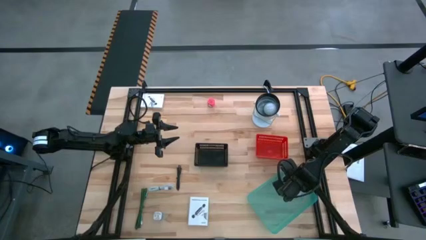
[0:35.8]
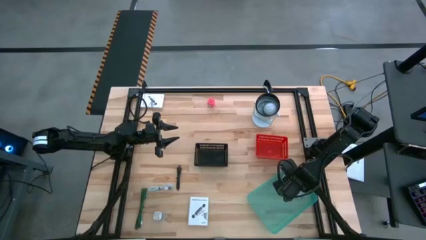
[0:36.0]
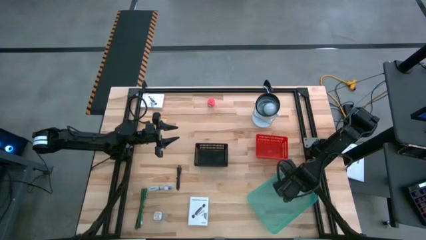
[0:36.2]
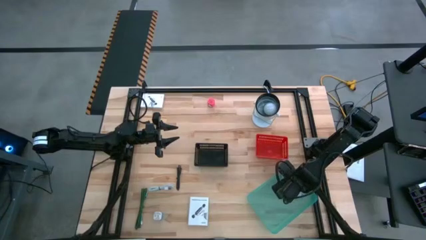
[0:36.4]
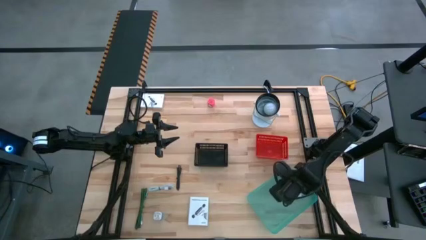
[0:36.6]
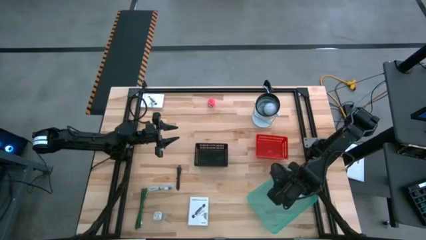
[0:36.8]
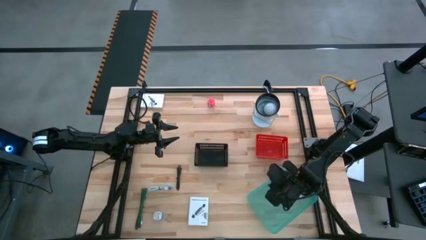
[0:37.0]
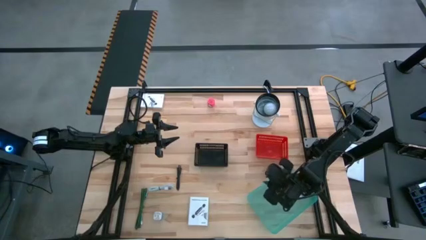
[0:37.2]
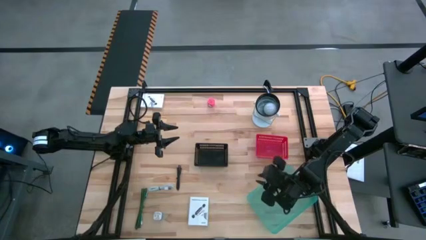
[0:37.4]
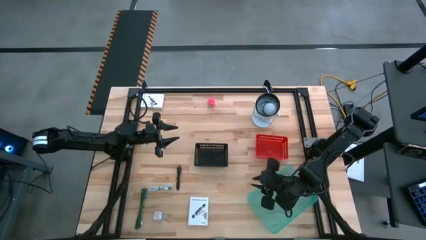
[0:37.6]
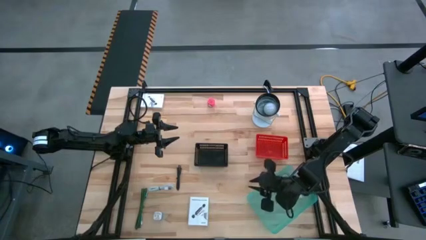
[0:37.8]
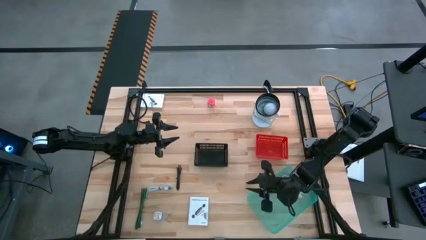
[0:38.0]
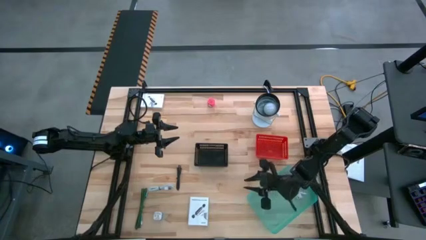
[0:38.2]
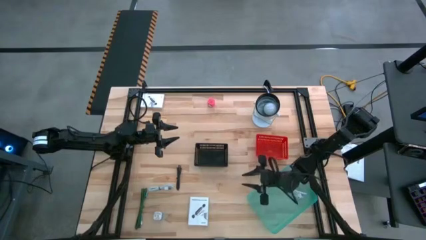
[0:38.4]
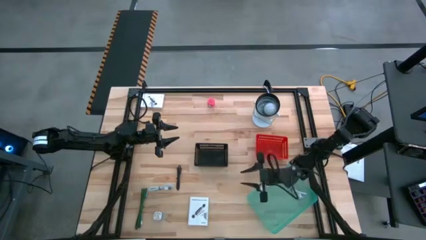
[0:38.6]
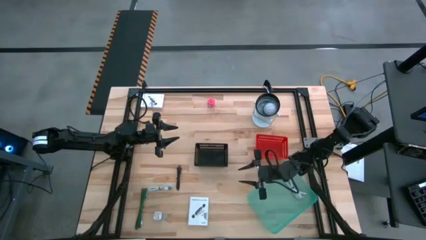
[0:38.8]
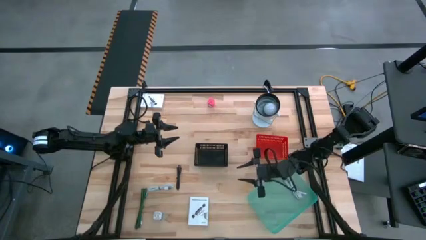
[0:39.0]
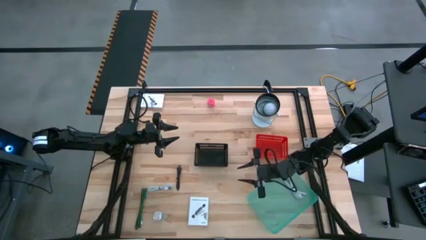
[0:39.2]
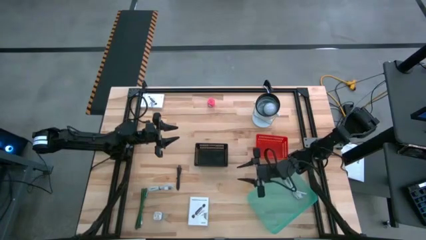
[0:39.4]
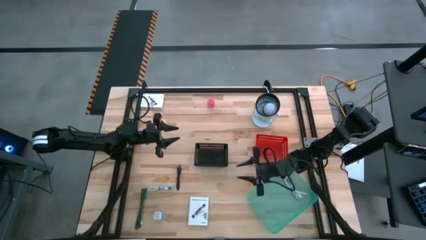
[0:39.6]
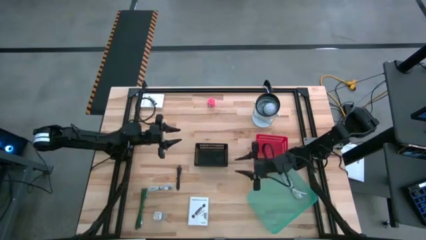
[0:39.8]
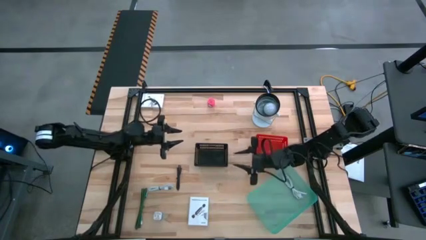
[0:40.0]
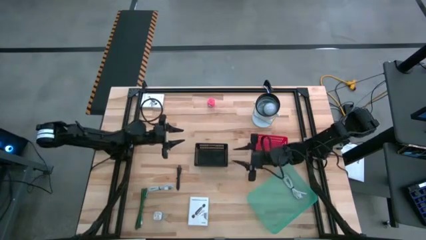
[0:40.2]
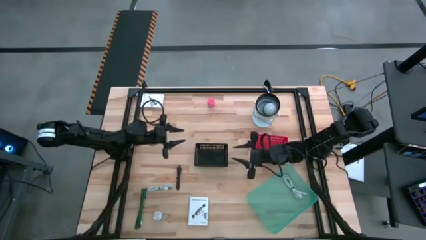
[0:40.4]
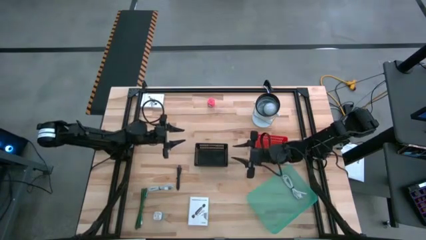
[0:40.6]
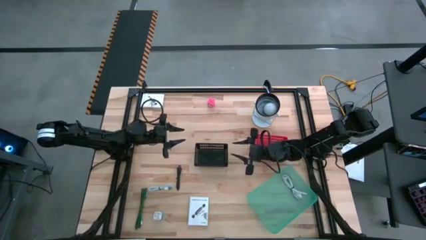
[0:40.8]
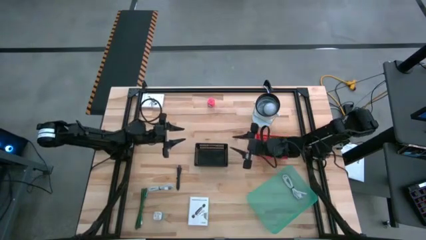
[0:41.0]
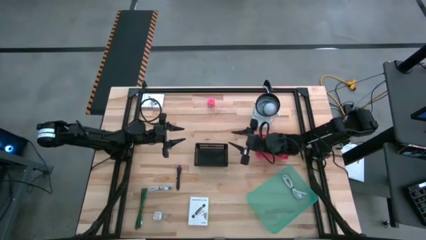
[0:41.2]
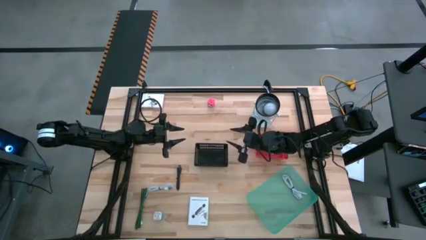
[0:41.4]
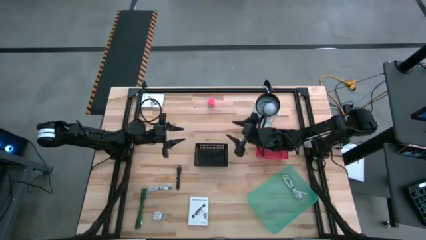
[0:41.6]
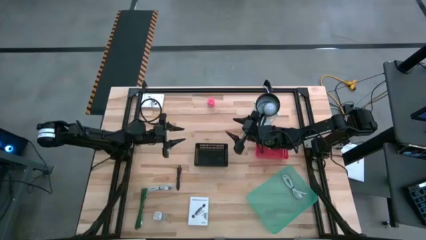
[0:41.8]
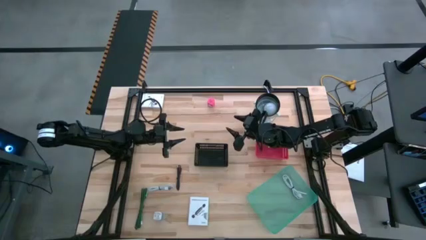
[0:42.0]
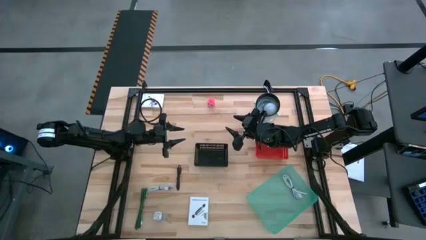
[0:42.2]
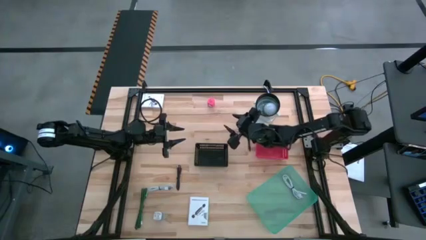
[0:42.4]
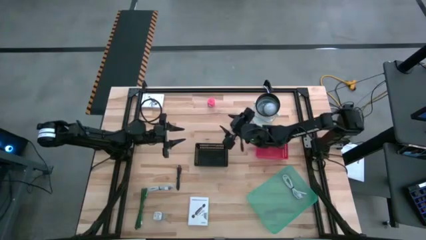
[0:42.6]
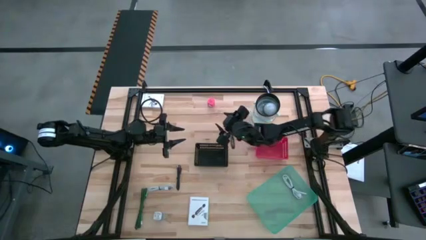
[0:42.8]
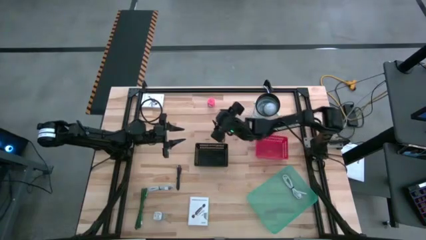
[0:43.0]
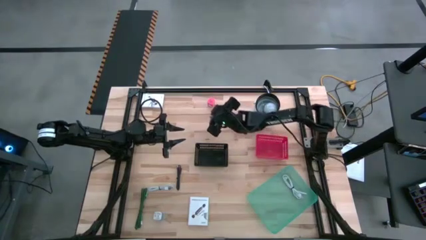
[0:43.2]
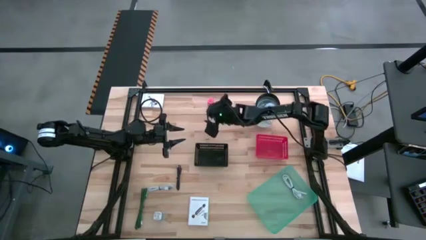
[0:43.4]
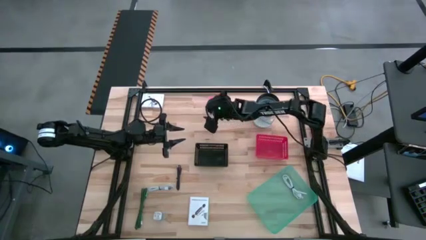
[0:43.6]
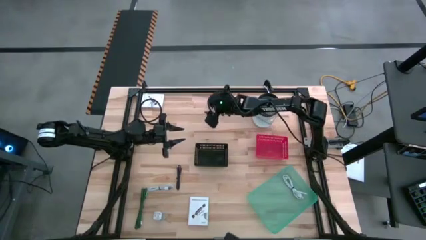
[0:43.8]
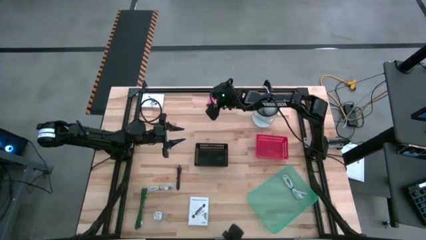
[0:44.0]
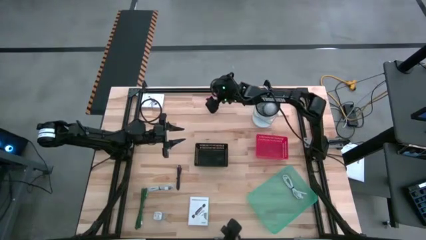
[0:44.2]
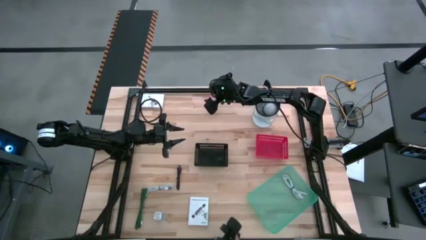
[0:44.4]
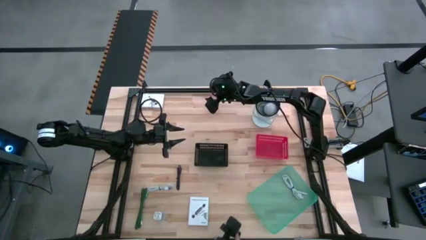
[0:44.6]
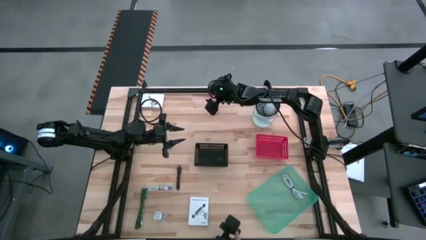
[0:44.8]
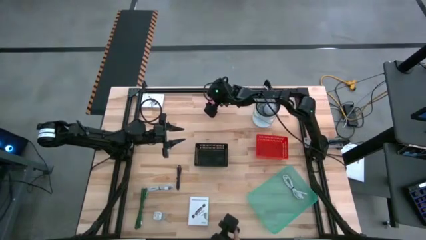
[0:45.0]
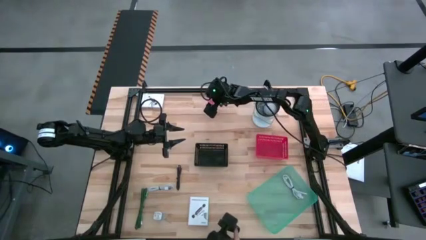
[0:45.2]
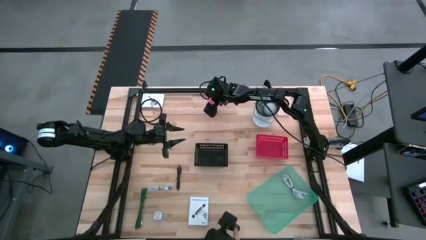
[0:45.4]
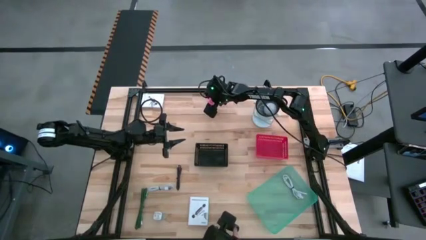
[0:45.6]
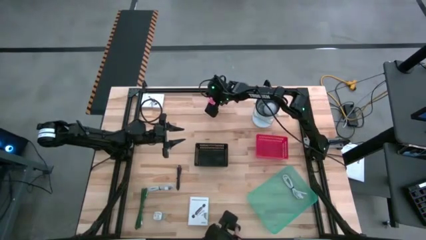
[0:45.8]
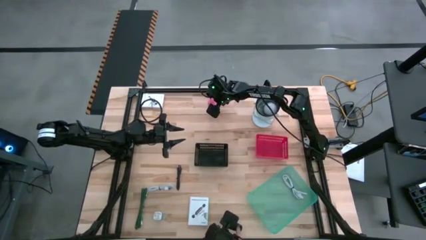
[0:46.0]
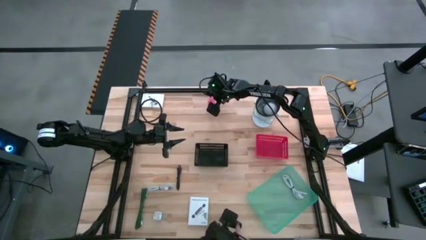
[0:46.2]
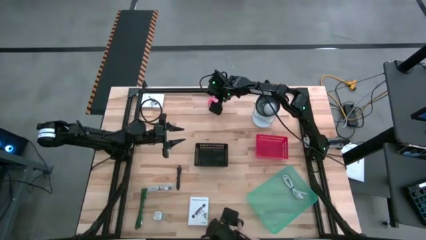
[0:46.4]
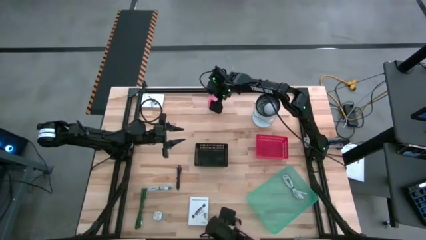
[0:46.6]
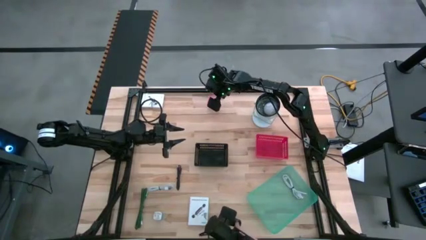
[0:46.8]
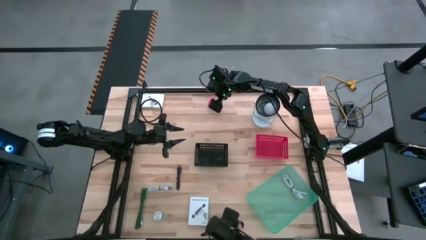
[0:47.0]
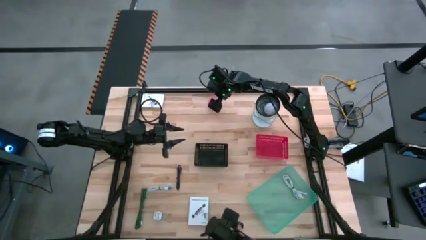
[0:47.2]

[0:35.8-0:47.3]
Task: Pick and place items into bin
Put the pink charger adapter into the red bin

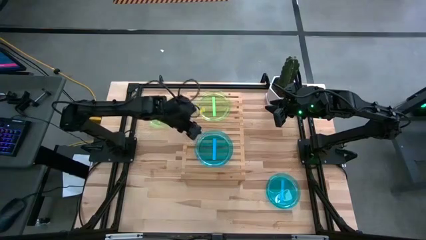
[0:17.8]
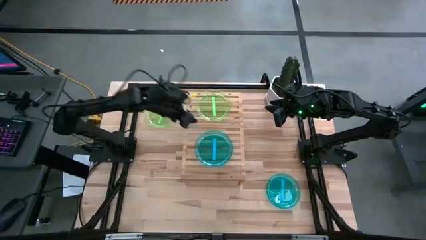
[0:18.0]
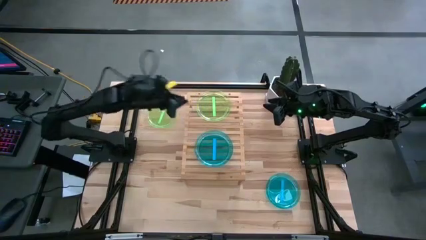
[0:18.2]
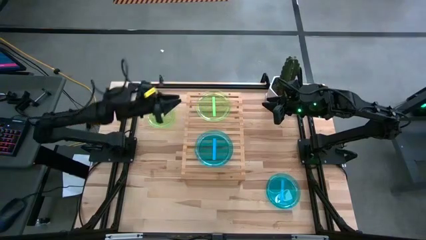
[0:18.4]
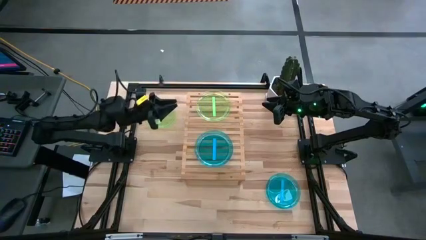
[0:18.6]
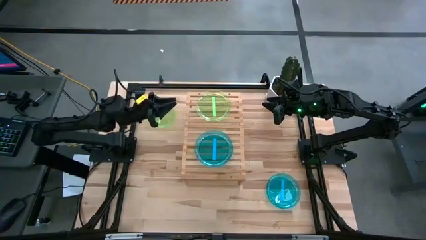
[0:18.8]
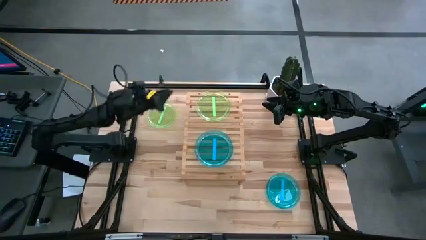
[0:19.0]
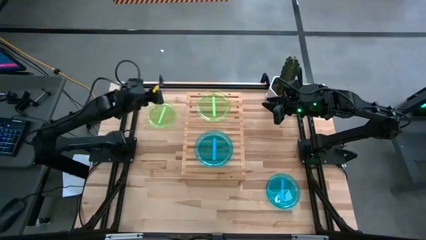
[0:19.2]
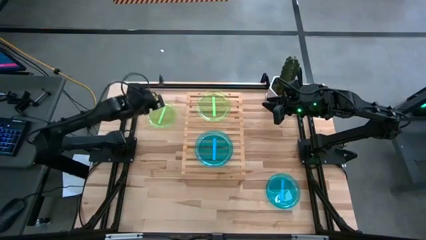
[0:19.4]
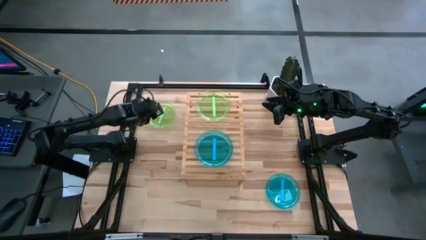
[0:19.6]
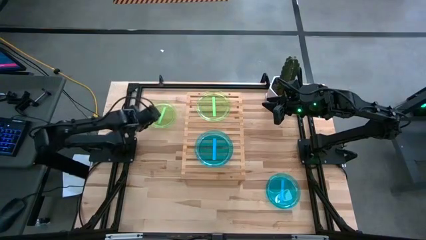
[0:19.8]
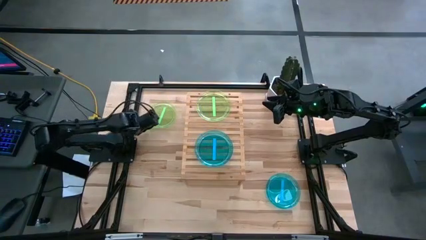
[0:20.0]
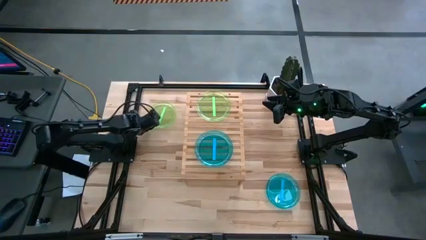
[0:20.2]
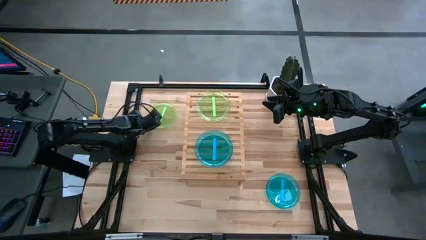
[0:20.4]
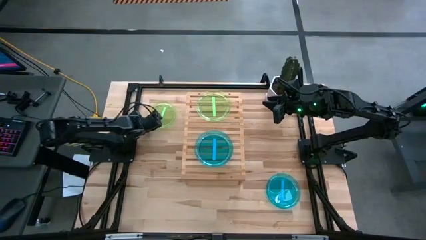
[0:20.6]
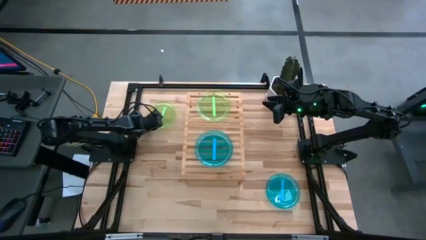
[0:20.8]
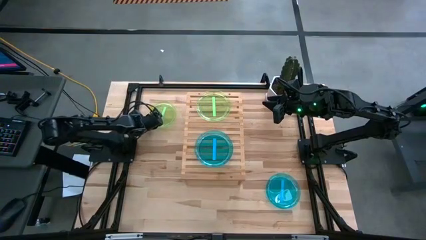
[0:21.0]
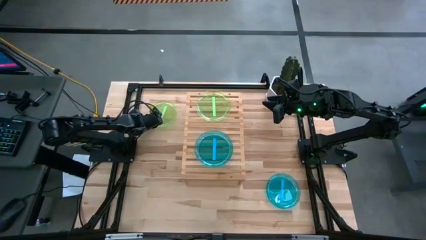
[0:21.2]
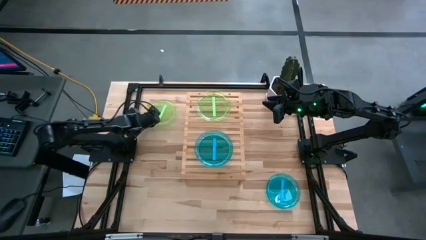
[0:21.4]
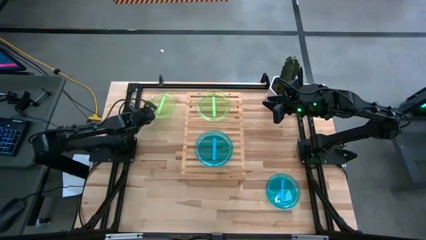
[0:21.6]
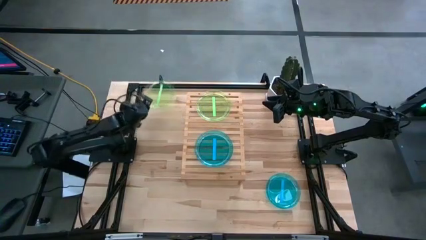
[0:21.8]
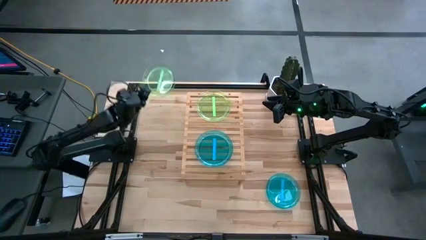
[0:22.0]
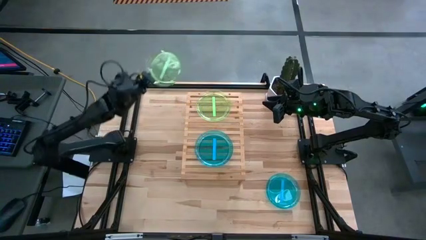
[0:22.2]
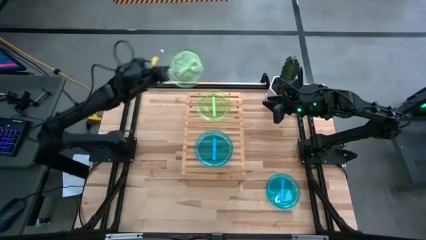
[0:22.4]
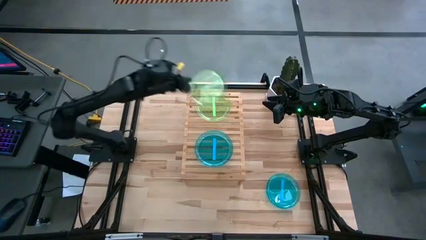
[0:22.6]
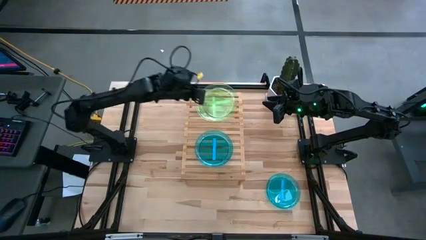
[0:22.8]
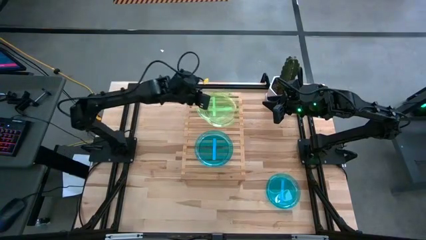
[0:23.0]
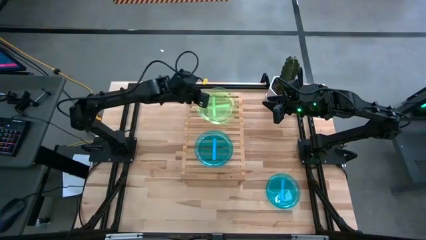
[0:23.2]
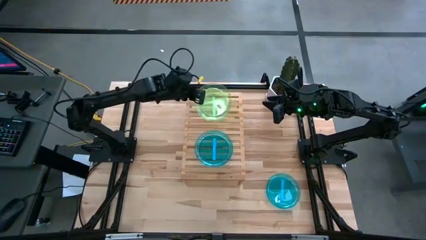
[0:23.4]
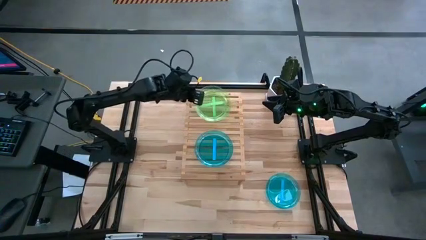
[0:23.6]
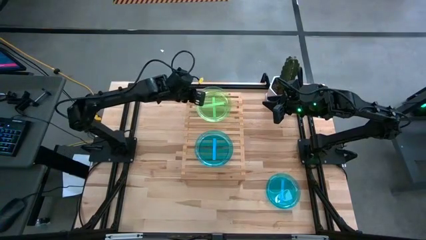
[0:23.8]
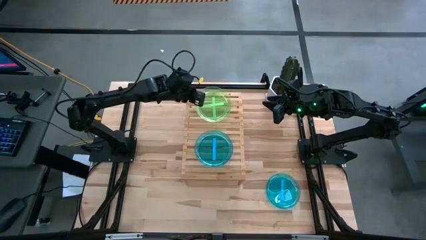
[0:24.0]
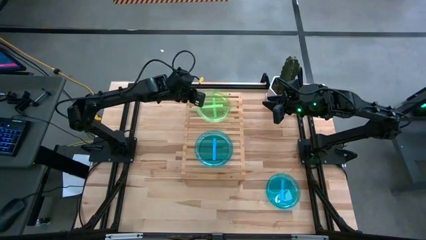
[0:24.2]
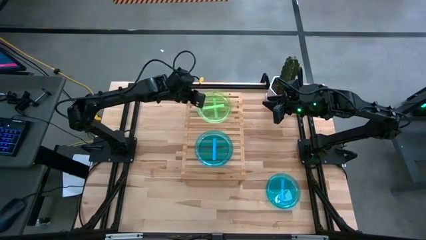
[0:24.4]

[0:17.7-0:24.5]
Task: Place and stack plates onto a shelf
Stack the green plate on the green plate on the shelf
